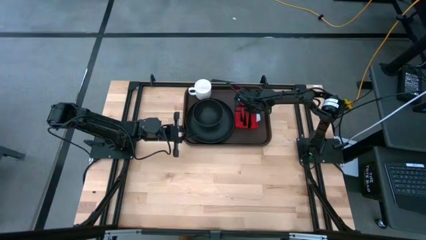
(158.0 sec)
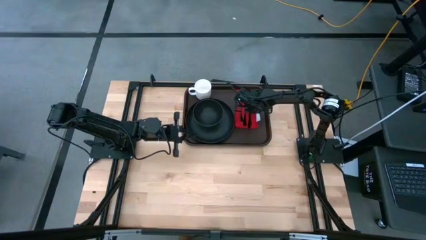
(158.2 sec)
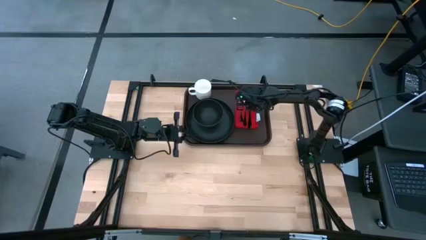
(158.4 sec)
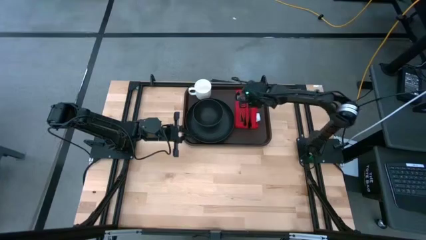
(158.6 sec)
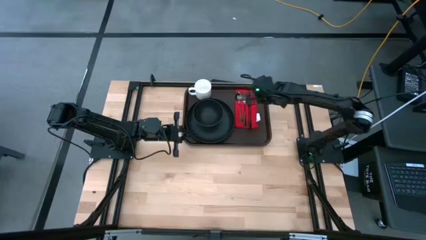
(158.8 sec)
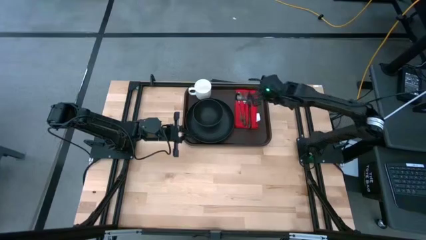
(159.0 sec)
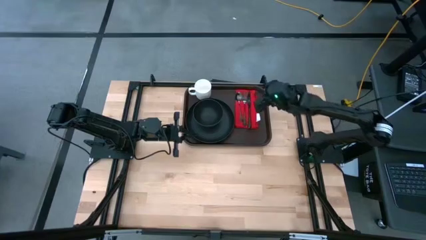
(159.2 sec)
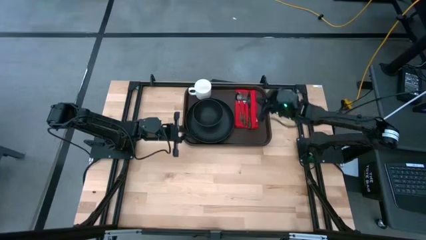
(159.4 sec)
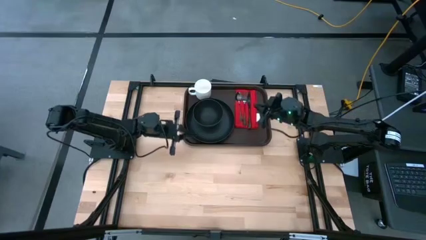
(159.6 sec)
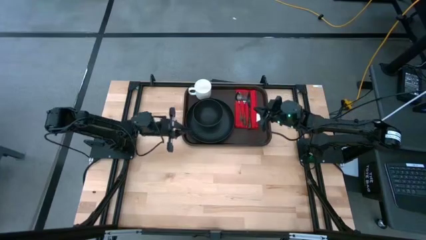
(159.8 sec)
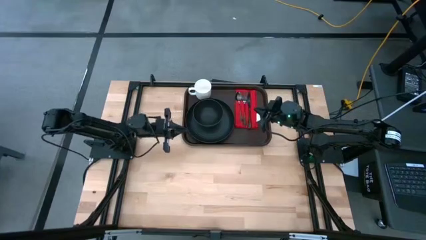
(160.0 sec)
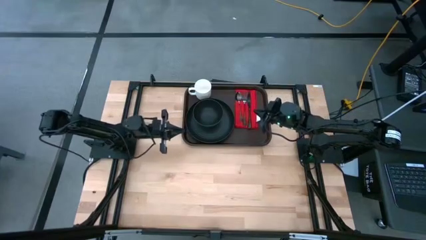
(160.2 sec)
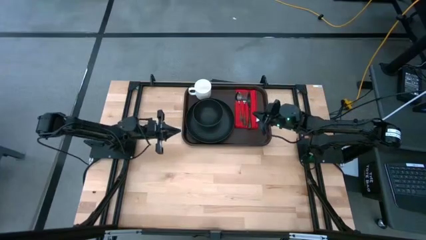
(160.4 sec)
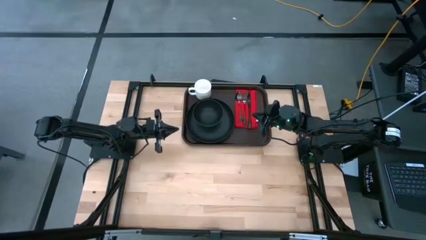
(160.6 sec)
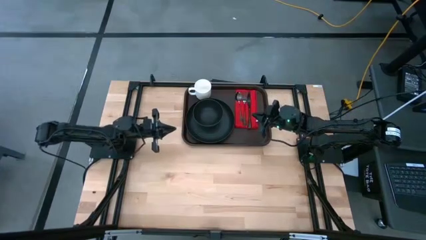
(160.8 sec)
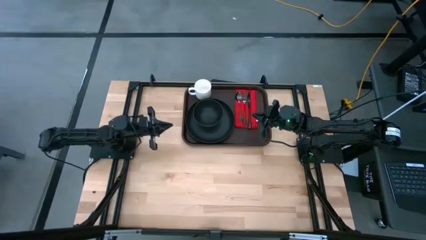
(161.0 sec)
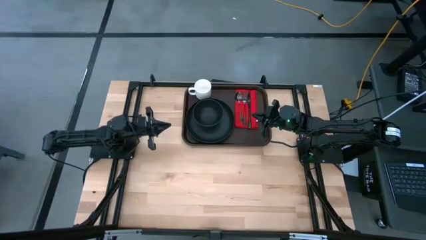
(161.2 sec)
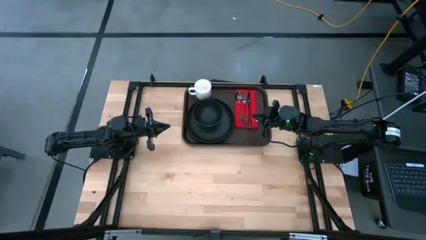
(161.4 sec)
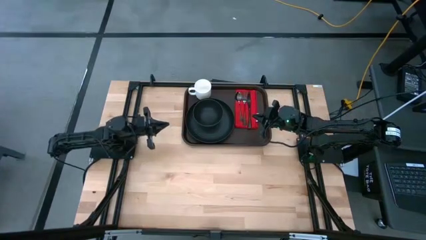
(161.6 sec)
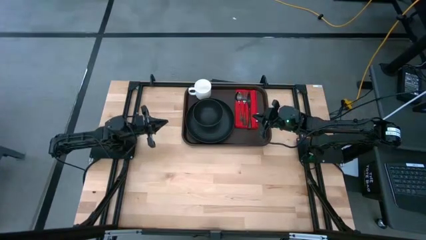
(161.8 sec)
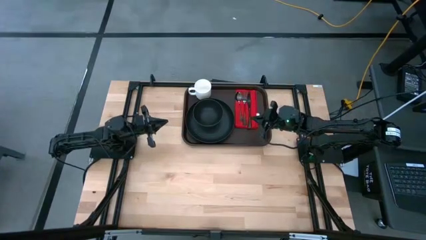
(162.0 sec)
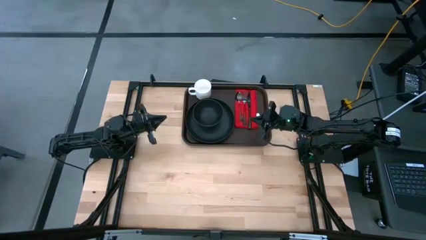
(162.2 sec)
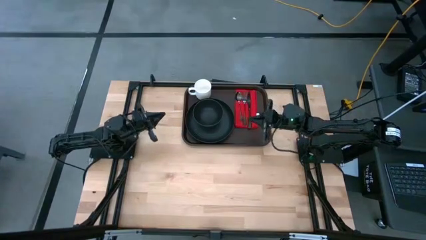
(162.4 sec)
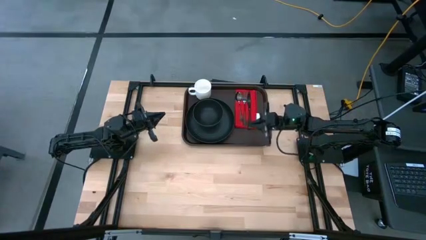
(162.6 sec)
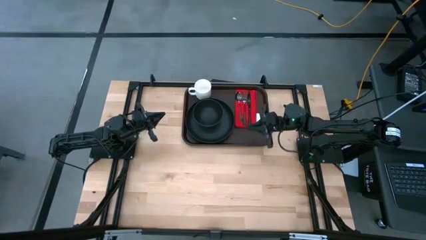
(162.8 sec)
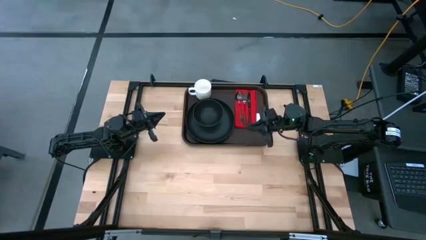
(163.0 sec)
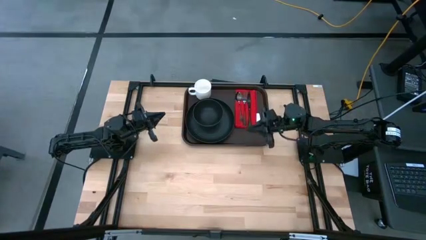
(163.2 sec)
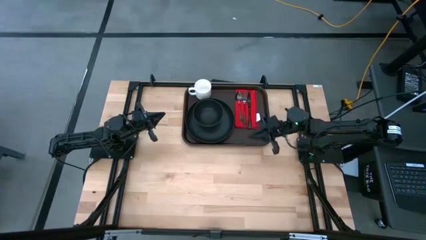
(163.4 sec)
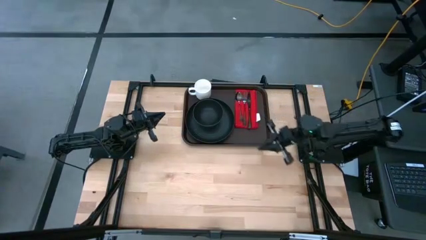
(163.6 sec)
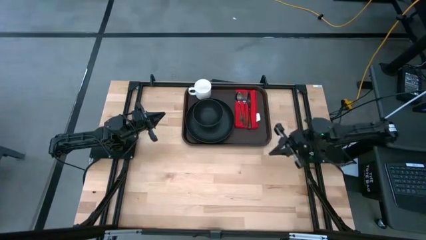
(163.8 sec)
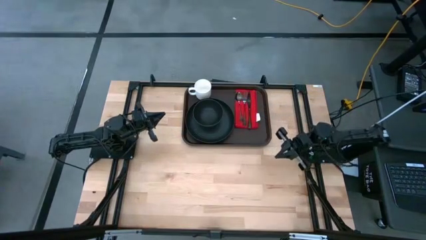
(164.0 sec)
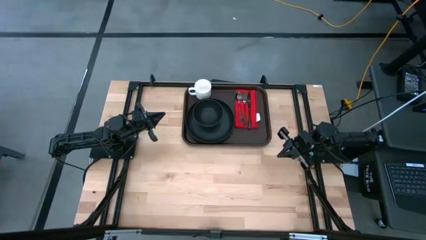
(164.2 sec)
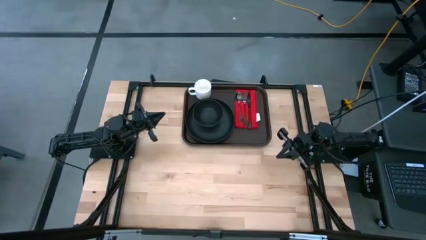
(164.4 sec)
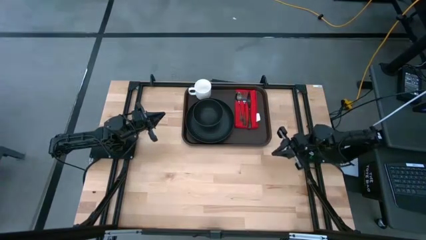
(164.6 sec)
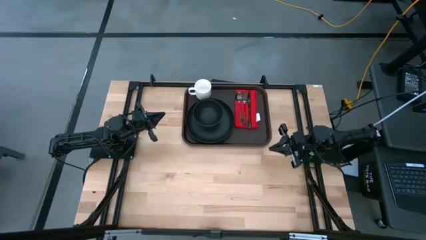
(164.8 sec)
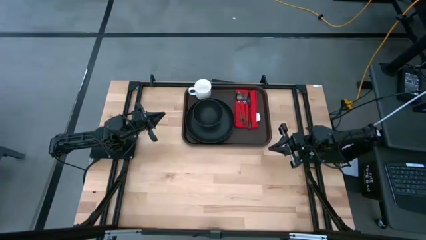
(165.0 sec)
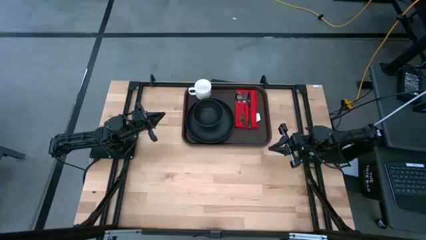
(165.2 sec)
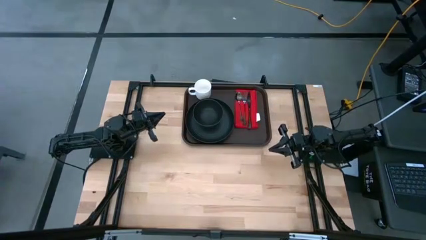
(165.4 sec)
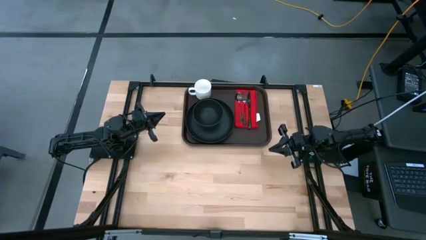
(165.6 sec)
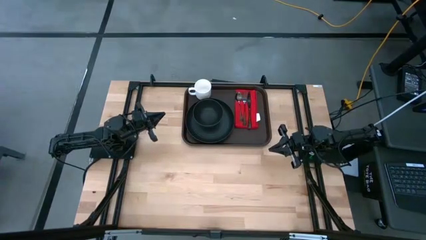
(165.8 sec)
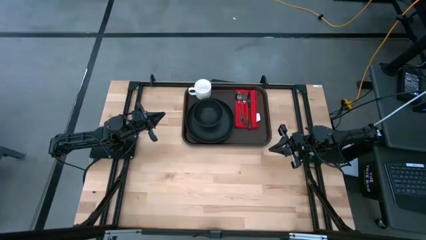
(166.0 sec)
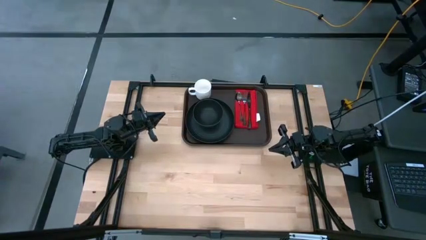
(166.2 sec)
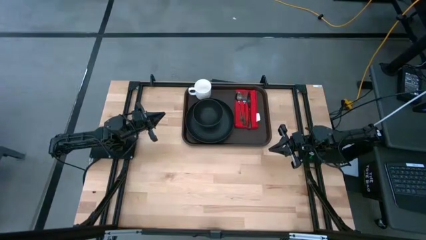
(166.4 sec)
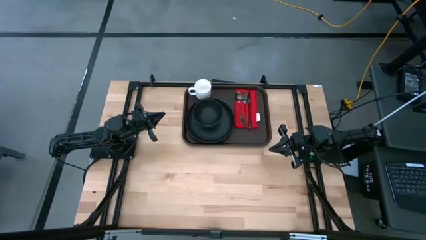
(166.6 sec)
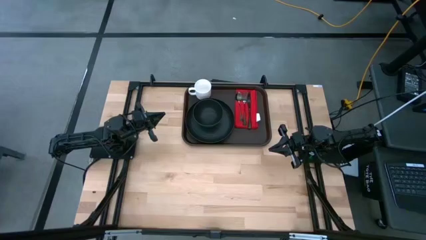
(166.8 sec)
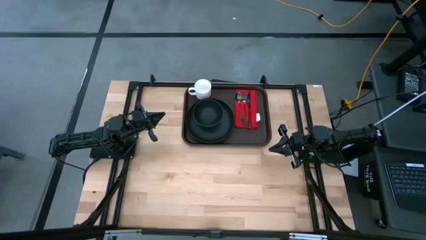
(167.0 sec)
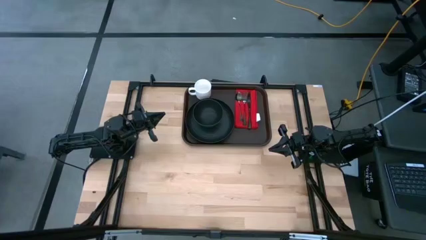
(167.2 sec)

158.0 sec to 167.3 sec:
Task: Set up tray
Return to Home Position

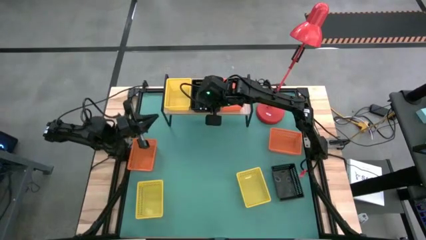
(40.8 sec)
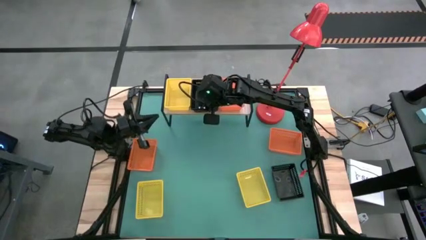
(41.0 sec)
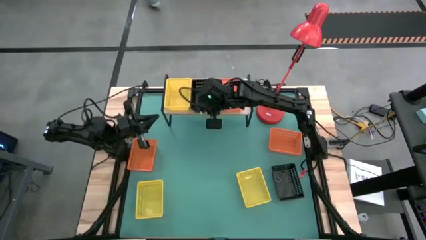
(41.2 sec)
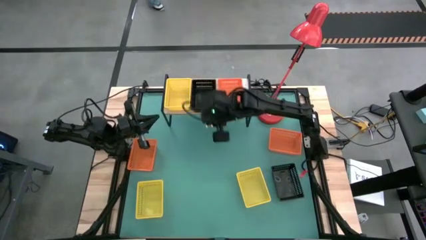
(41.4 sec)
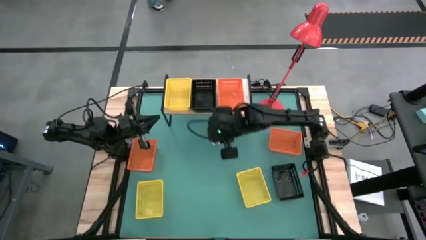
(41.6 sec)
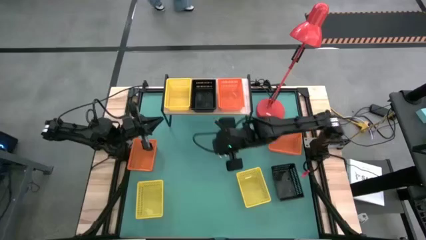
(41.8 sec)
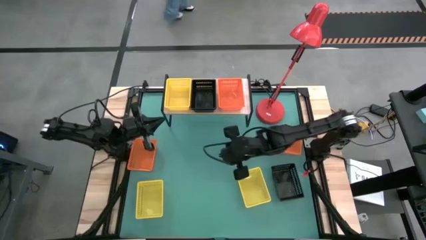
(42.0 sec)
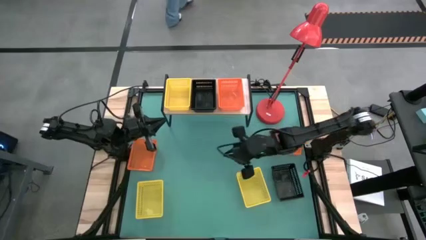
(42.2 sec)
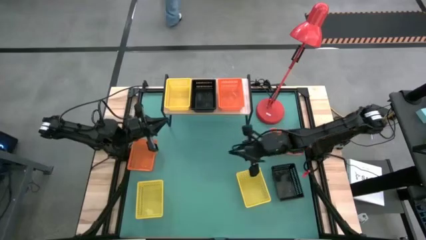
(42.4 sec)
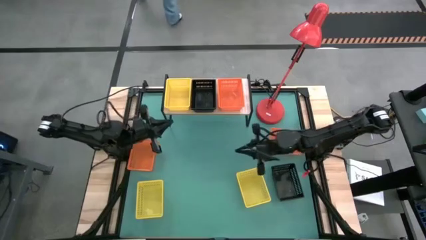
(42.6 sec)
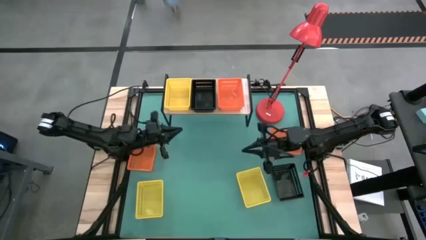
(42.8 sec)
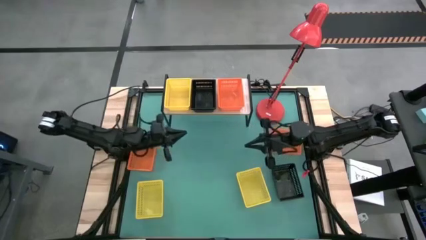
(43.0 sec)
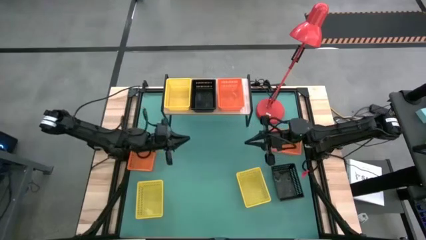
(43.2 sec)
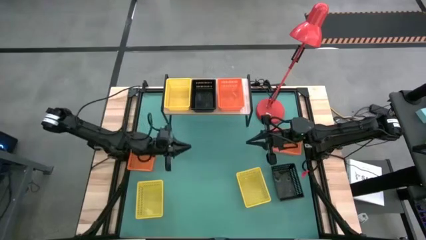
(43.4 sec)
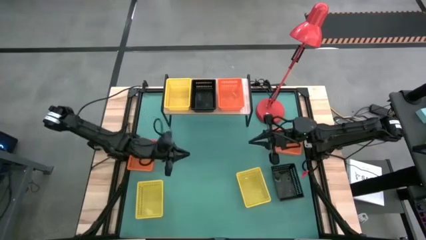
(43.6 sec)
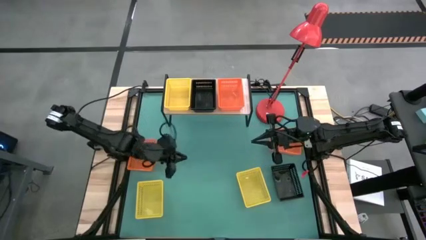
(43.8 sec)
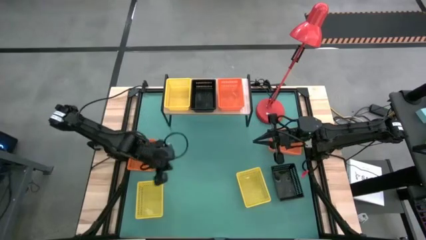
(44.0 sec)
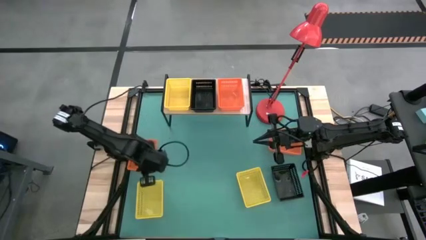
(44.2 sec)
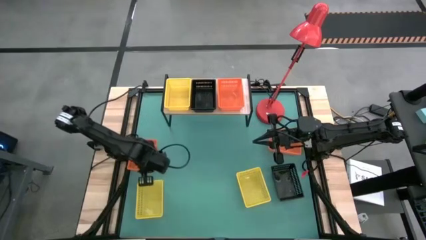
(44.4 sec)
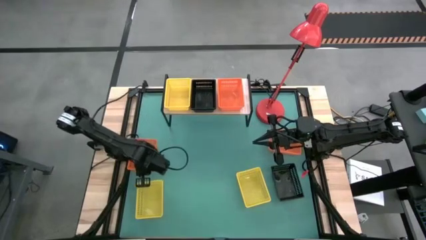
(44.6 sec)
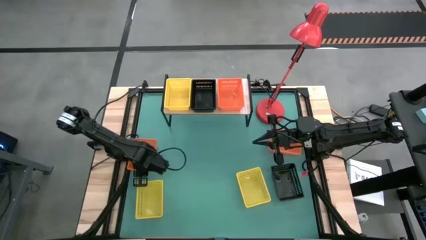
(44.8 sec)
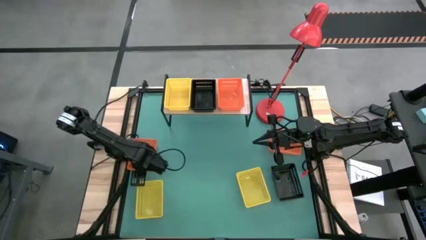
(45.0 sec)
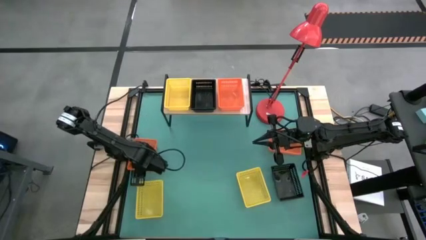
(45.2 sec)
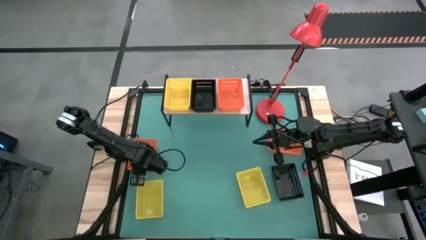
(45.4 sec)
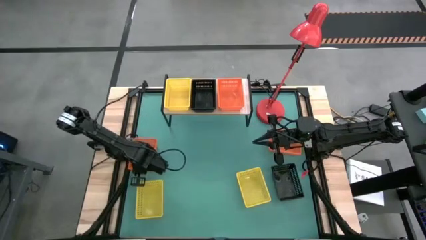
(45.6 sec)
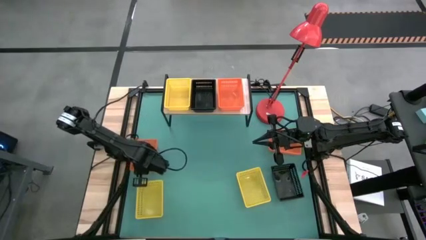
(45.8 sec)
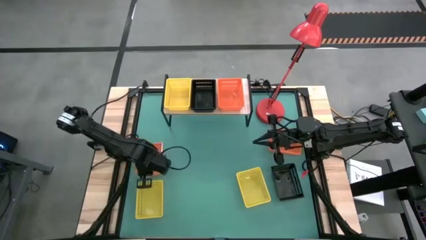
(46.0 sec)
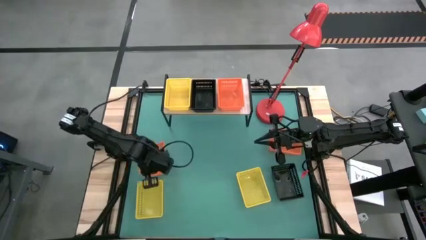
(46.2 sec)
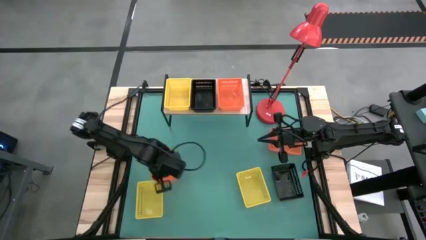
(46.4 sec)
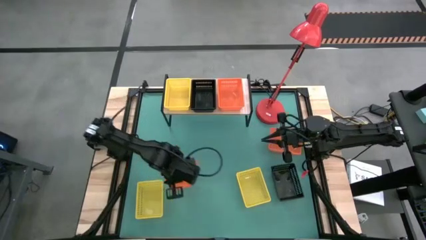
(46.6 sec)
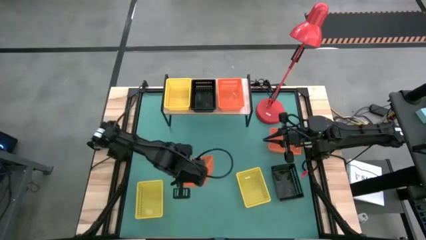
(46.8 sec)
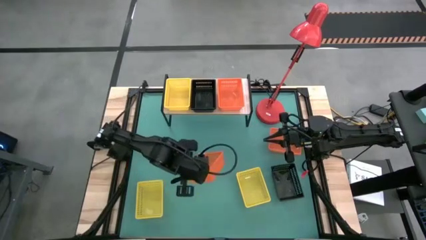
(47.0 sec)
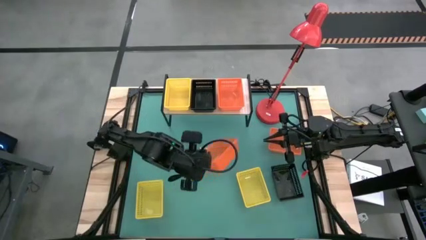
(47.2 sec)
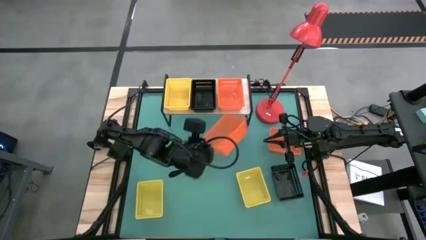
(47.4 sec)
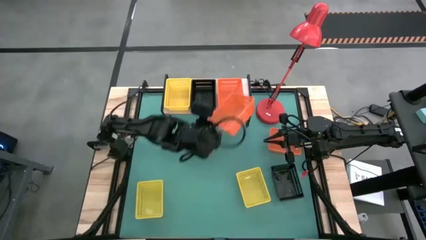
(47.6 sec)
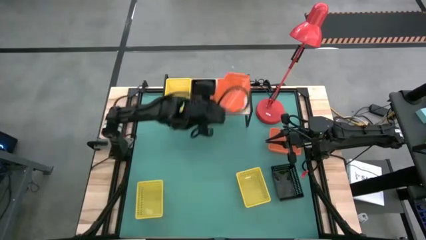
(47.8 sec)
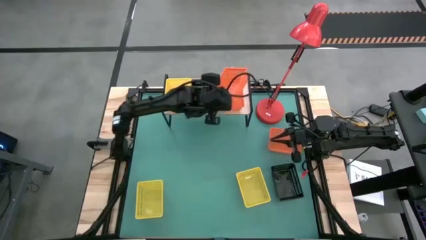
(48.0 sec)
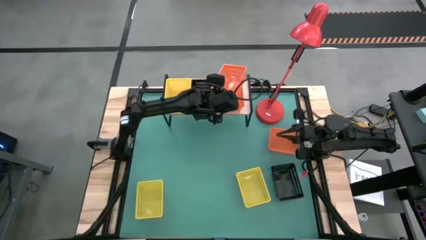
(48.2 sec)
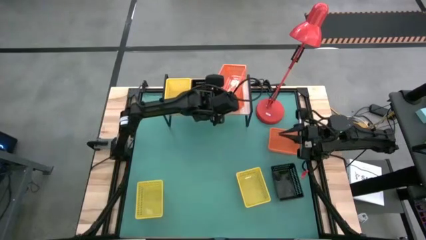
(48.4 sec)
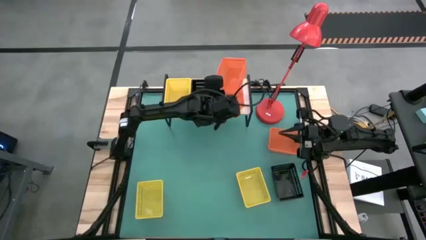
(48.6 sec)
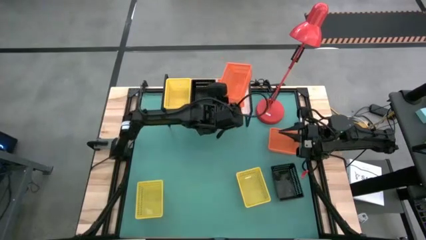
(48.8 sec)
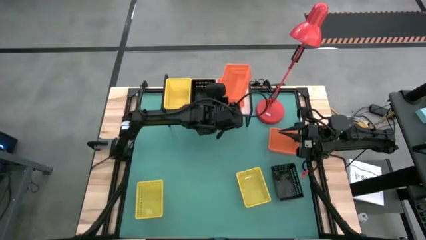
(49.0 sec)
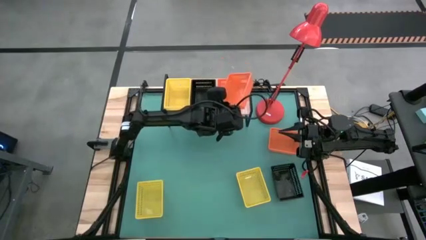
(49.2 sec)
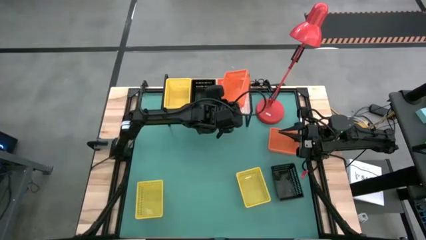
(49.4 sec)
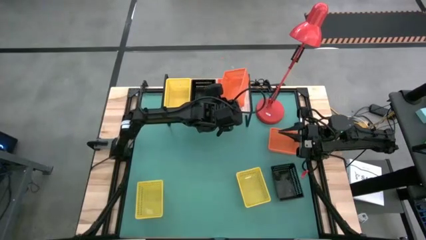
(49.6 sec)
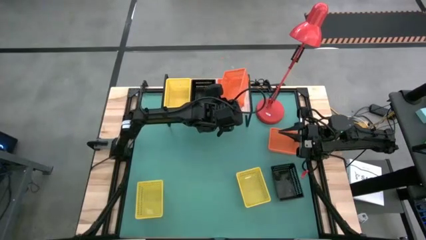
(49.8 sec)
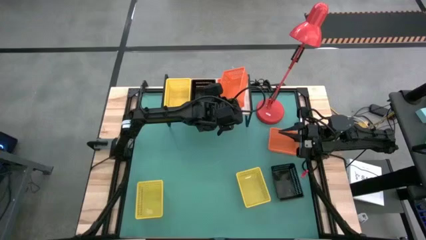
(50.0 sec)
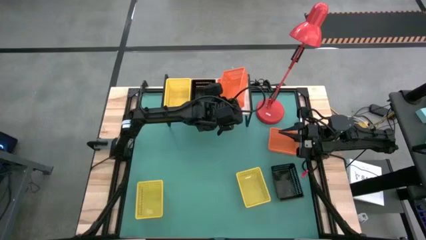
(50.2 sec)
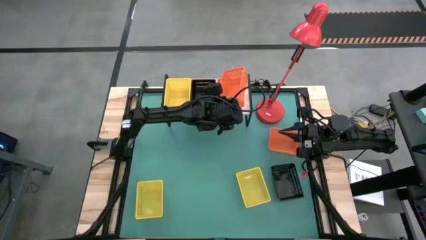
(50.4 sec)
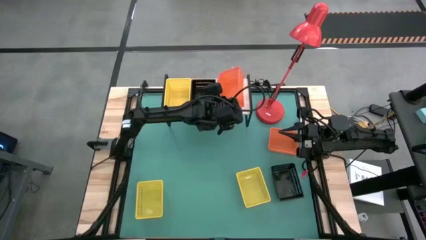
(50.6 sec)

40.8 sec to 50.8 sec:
Task: Stack baskets on shelf by color
Stack the left orange bin on top of the orange bin on the shelf
